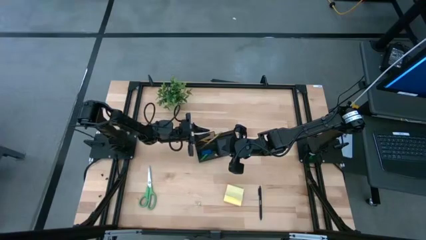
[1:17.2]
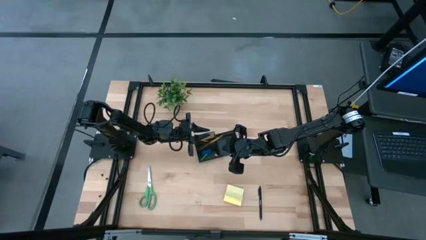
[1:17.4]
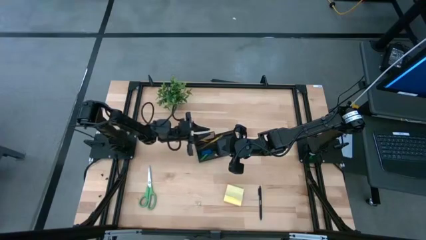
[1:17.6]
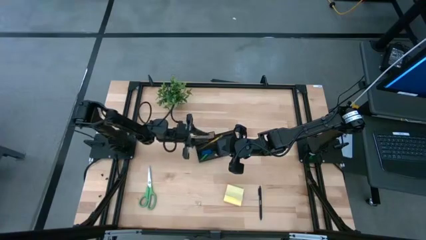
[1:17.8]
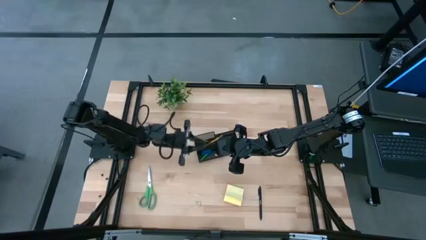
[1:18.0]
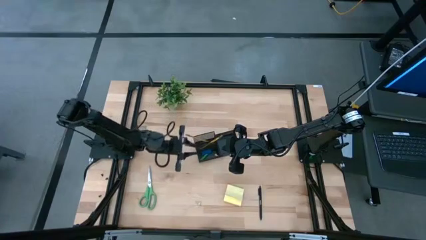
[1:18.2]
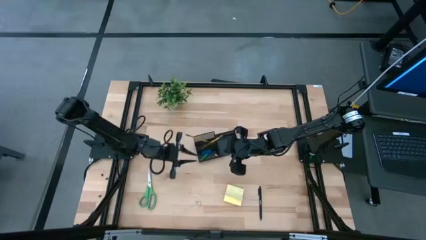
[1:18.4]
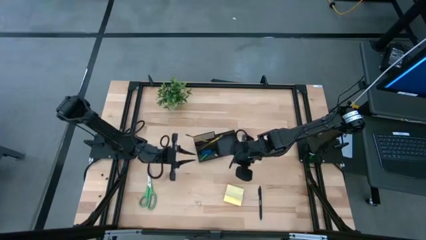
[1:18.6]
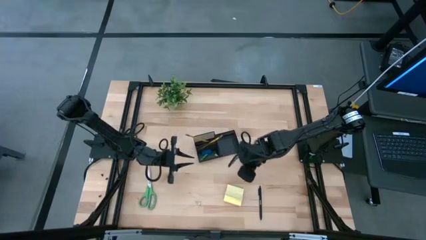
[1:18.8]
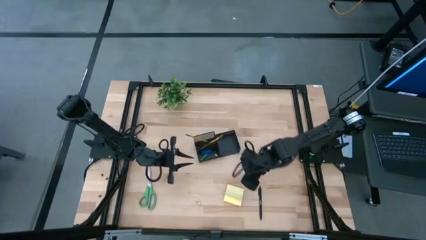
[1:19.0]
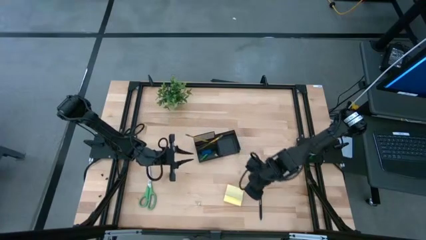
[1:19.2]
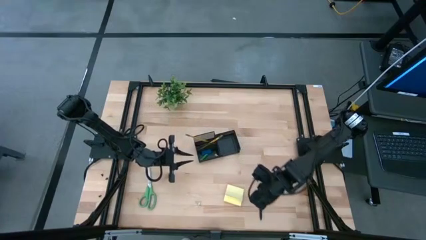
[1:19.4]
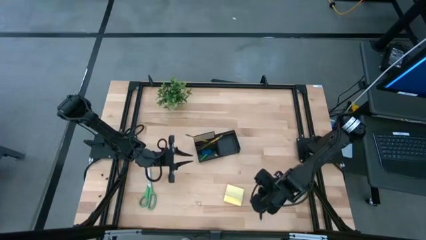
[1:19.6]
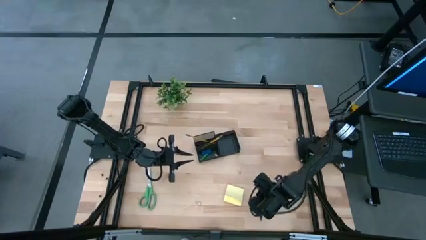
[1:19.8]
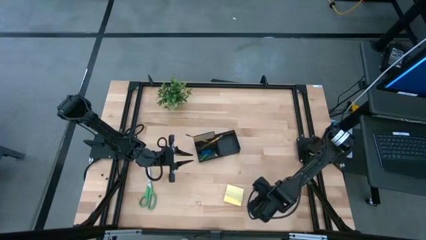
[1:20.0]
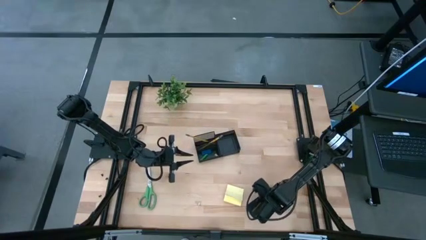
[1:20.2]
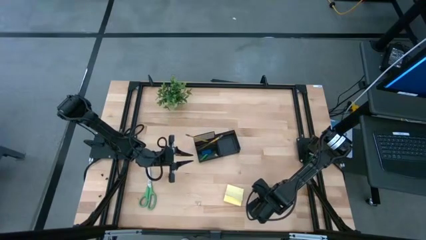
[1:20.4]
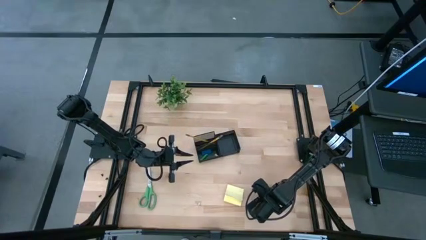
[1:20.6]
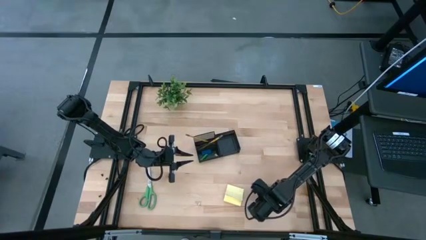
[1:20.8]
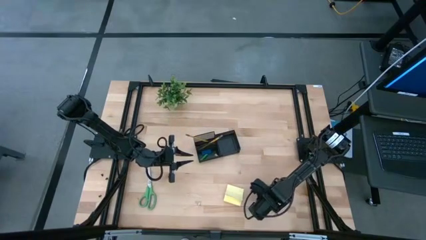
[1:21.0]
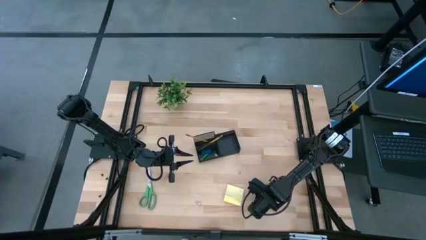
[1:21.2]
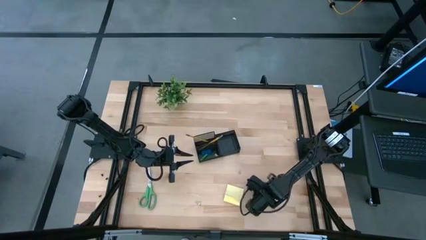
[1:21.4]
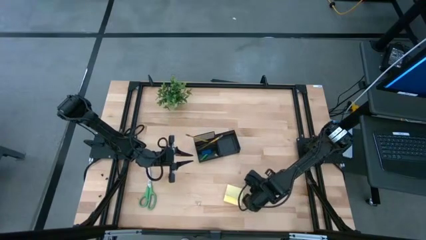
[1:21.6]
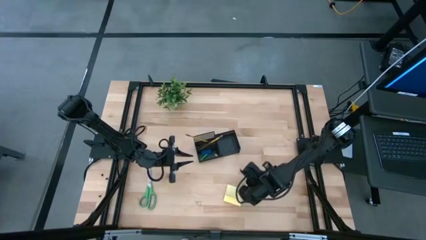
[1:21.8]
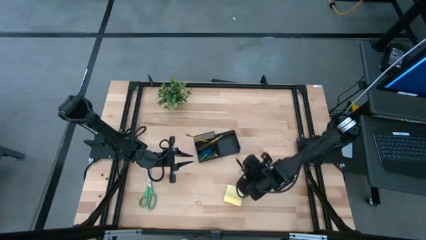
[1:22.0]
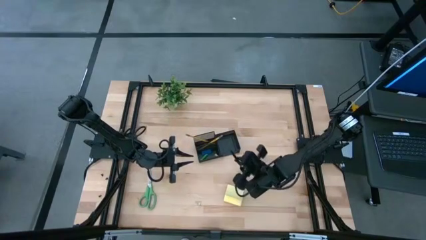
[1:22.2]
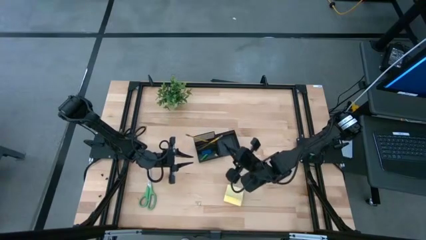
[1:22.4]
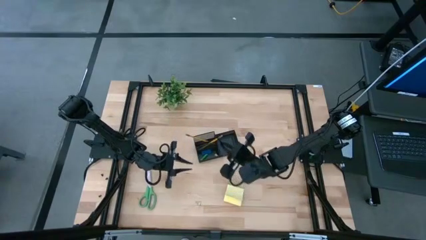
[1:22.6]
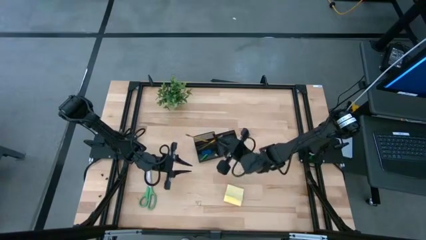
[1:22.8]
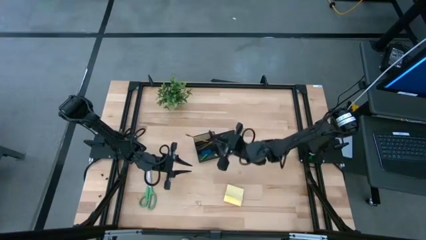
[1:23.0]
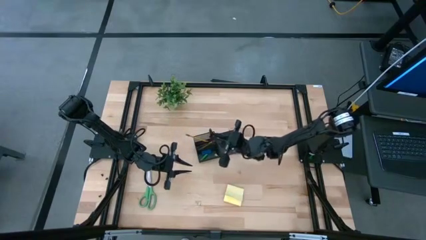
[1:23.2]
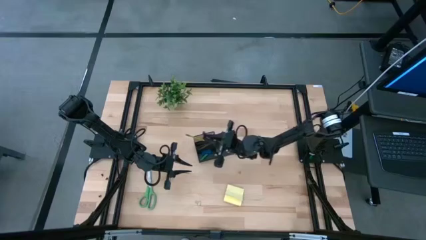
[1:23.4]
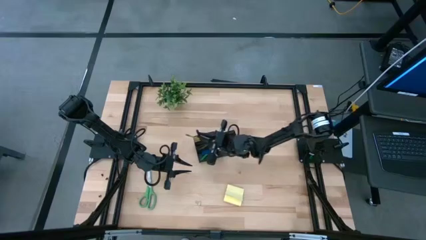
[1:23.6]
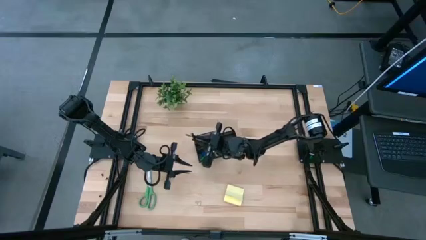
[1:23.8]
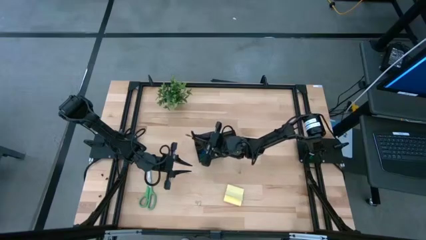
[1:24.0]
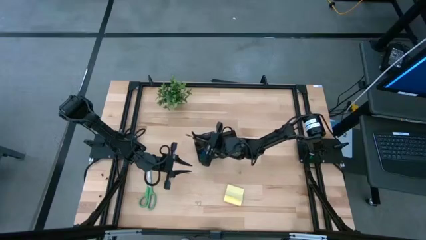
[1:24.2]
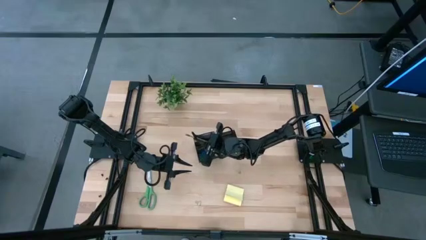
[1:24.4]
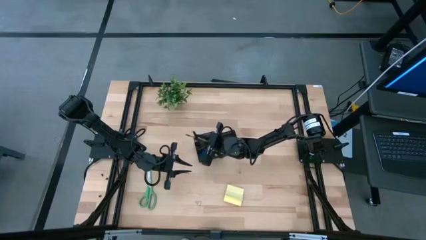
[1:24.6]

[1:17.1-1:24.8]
Task: Pick and place office supplies into organizer
Put the black pen into the black desk organizer

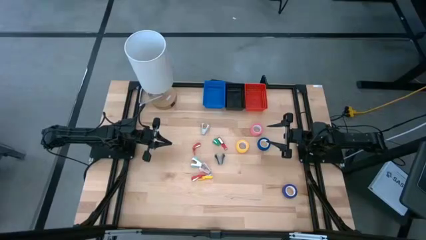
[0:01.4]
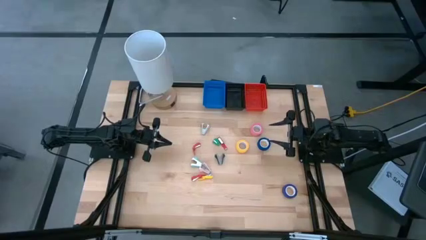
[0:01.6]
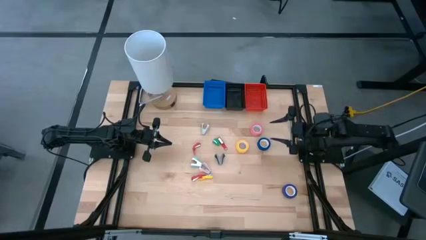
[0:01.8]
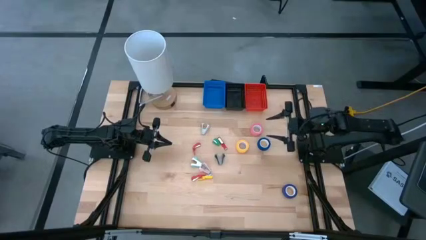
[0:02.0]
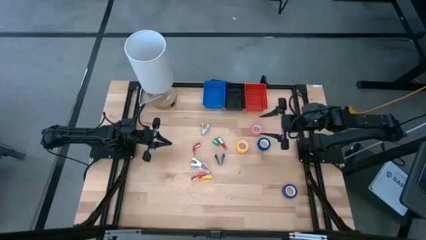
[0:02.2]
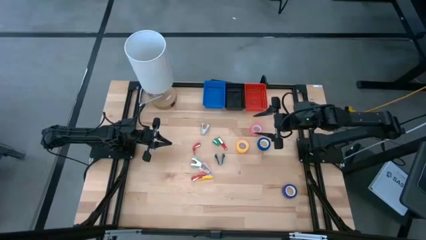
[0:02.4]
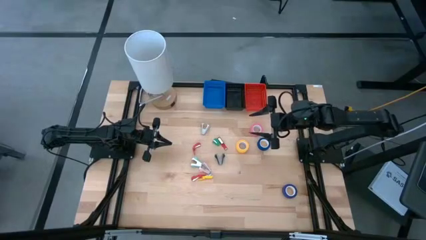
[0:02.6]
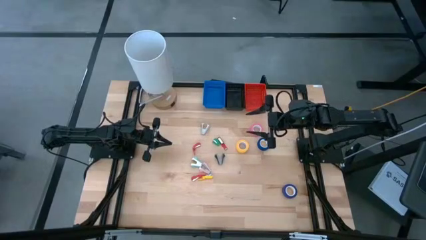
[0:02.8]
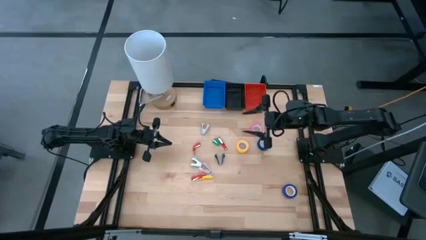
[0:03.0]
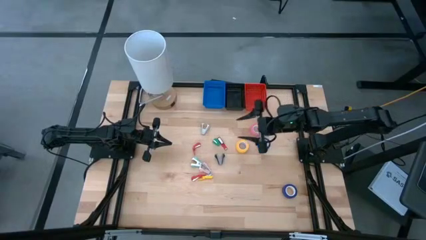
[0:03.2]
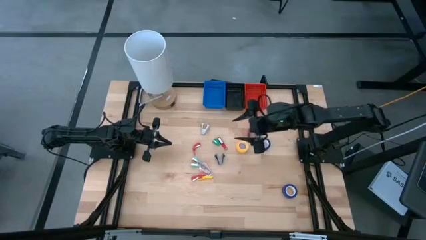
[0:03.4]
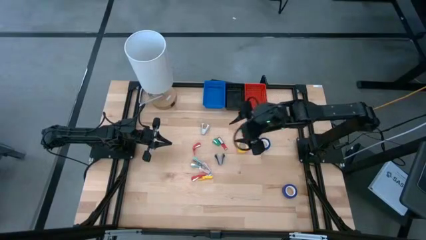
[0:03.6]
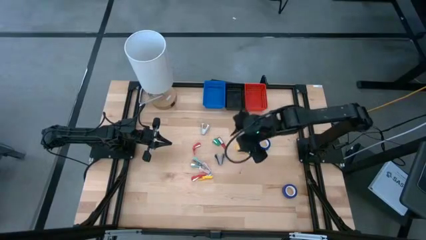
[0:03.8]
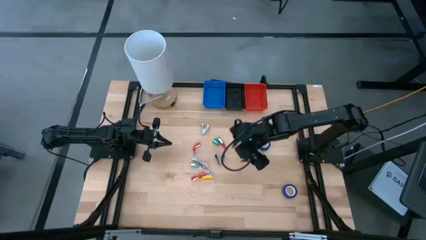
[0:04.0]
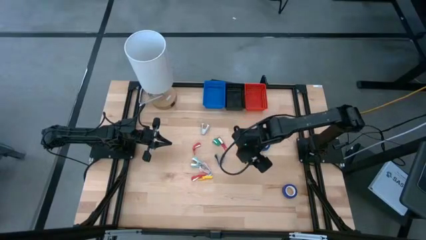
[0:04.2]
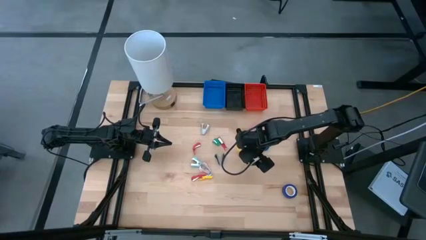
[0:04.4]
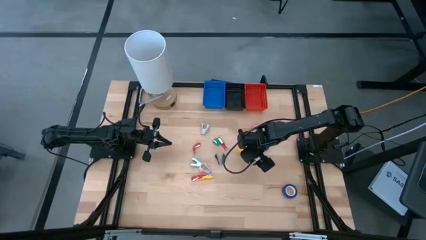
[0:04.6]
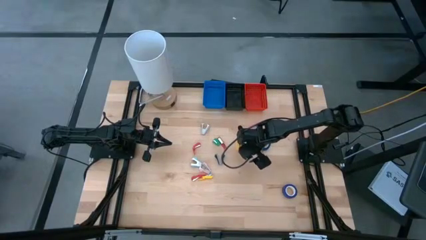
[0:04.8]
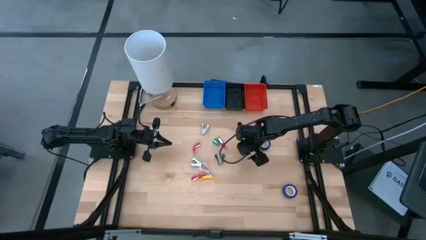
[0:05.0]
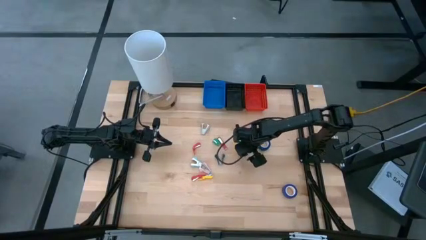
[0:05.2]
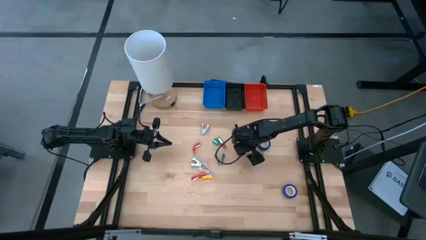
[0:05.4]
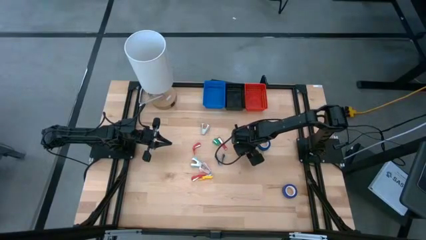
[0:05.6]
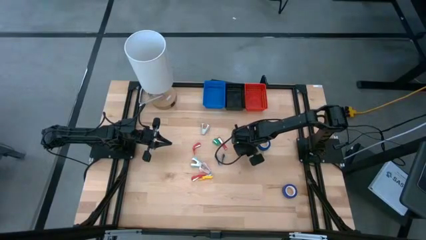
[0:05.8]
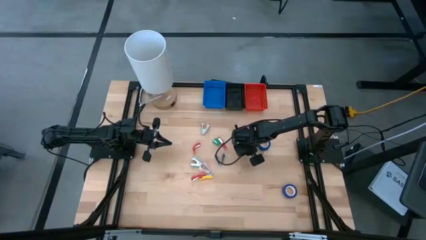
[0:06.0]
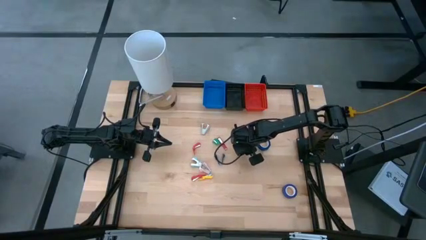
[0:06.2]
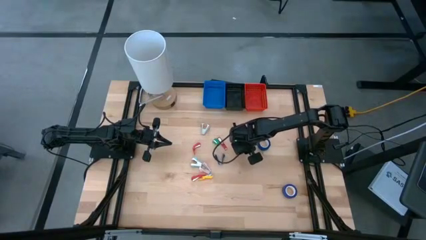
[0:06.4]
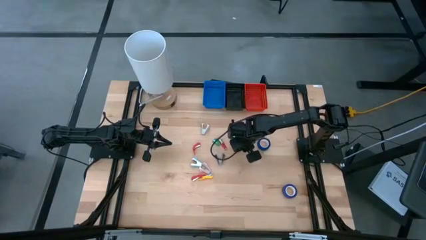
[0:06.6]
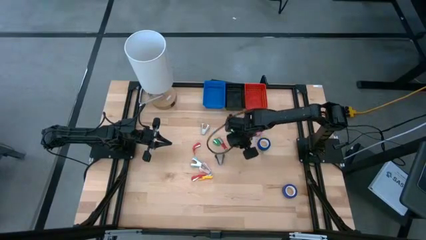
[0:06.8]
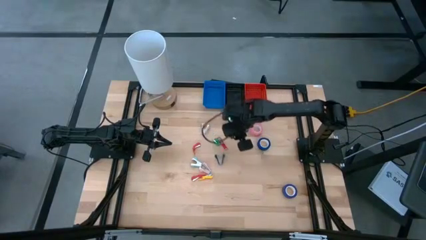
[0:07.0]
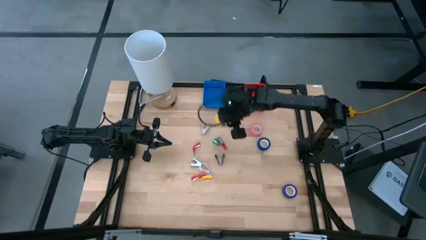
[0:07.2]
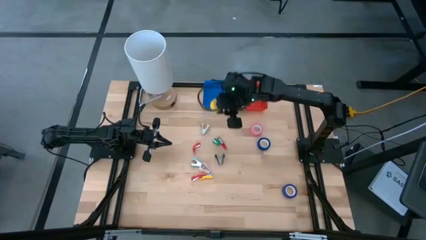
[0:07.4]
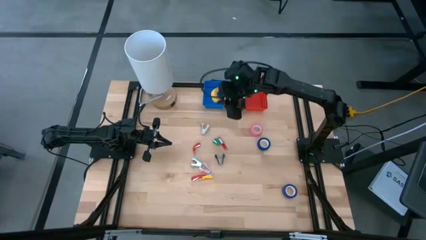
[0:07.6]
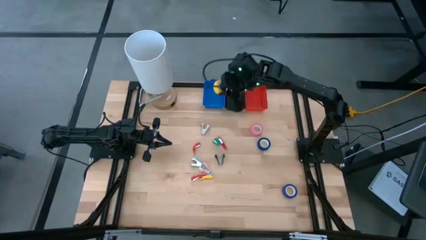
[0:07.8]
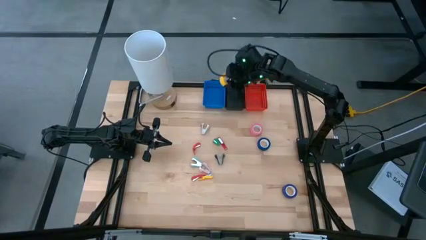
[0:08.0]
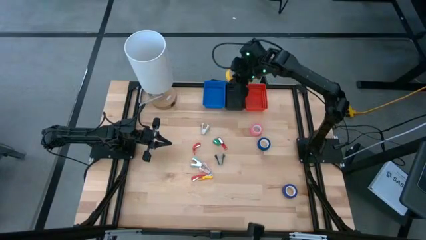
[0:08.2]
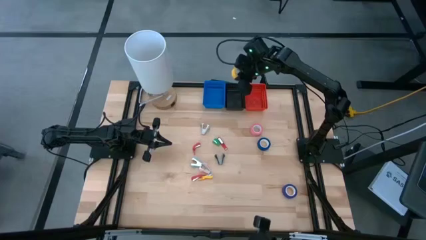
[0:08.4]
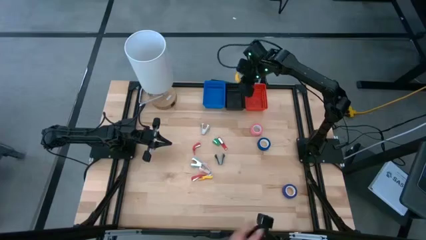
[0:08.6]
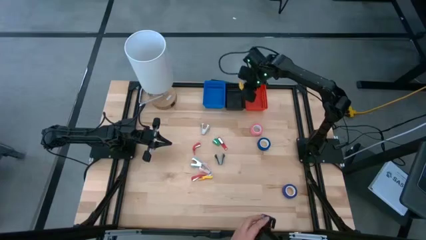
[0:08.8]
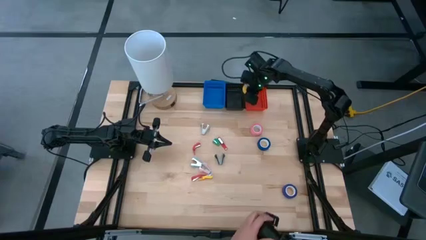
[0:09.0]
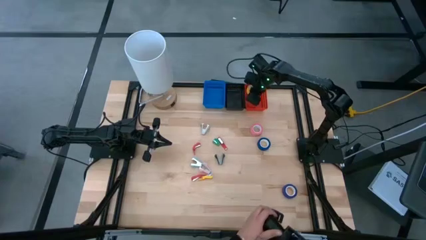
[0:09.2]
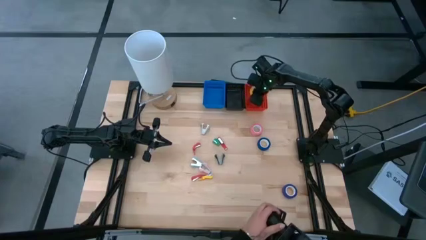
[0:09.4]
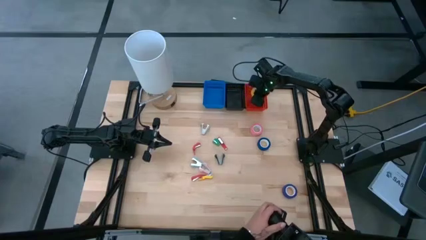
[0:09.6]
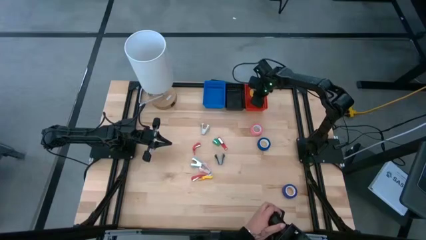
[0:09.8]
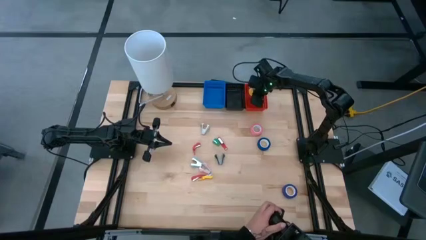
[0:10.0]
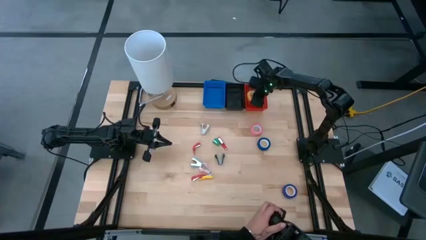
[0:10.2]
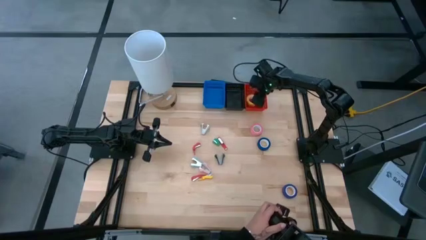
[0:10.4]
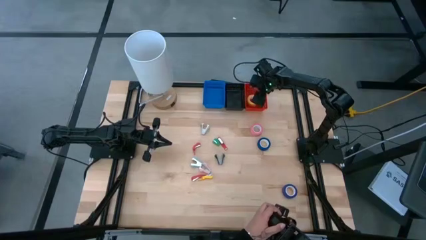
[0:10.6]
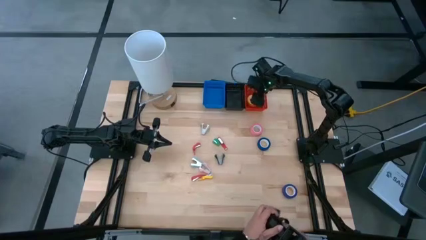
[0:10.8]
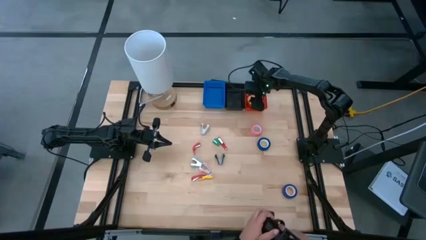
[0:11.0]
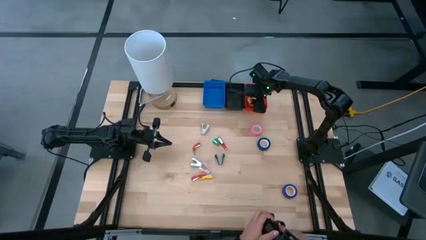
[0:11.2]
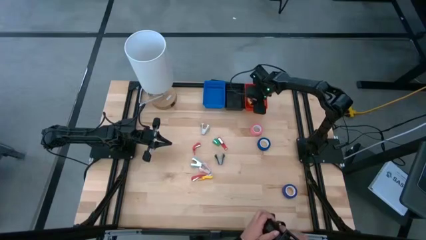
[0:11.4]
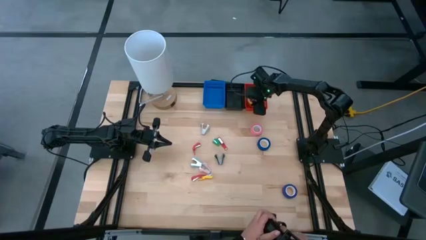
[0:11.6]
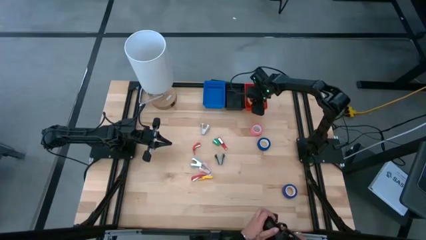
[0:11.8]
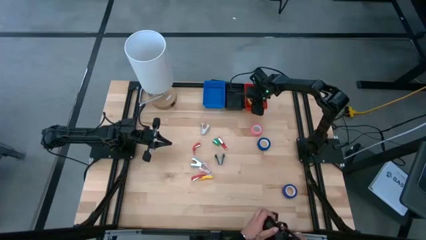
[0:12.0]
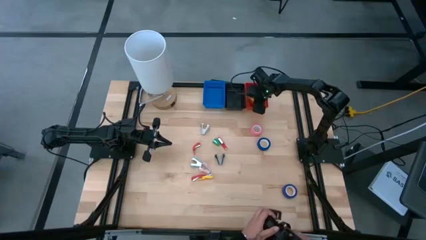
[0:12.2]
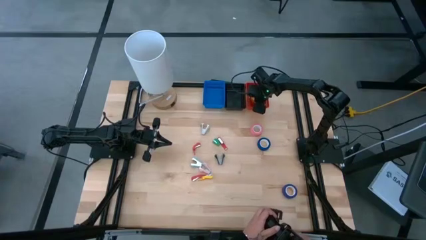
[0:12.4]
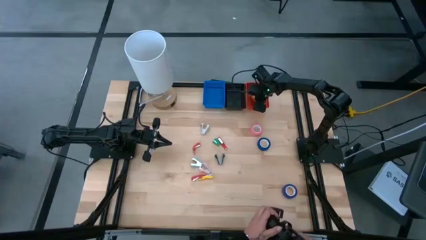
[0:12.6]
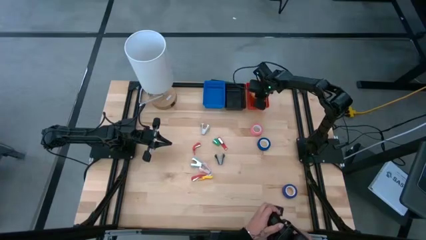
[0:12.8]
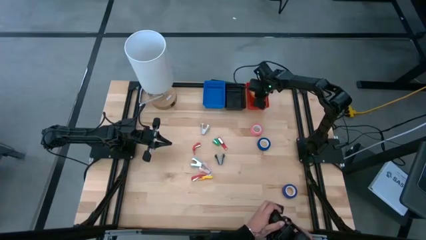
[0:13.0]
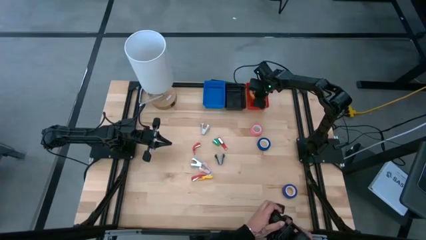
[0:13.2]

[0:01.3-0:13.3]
Task: Pick and place Stapler, Stapler remover, tape
Put the yellow tape into the red bin
